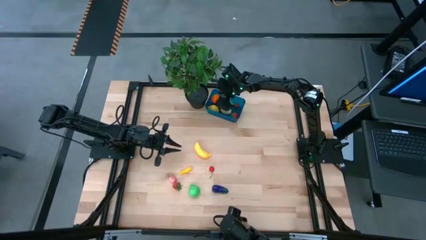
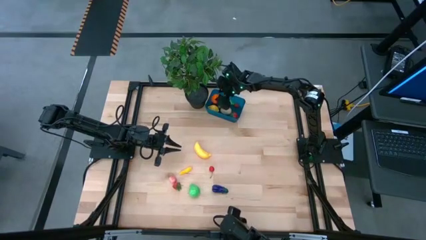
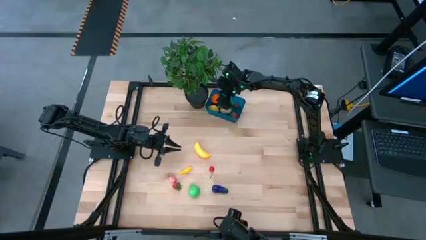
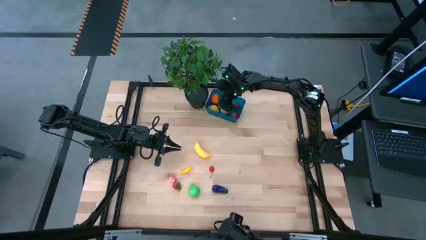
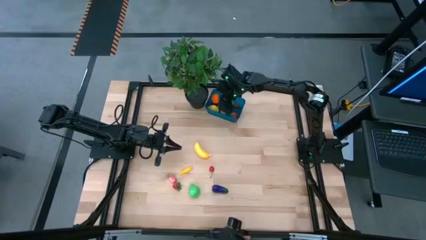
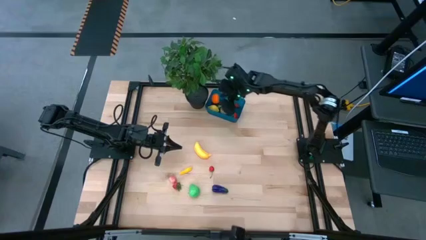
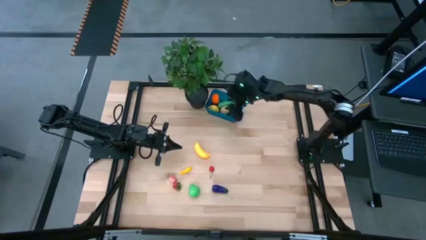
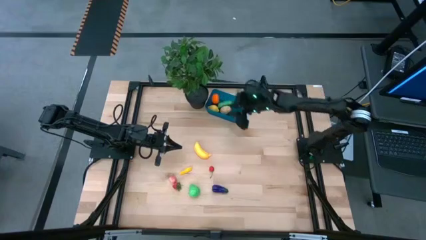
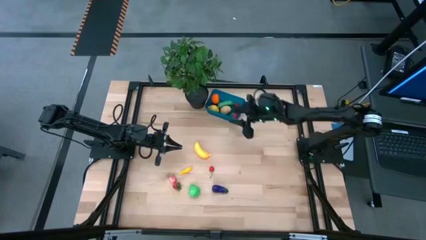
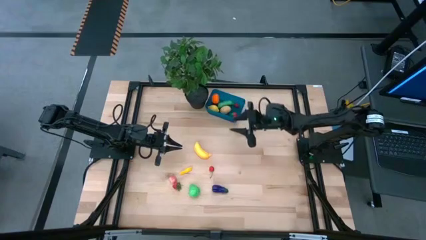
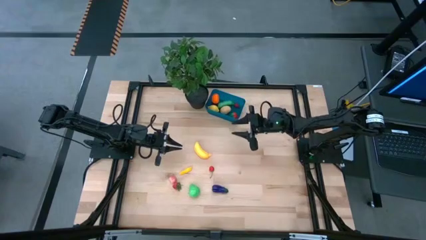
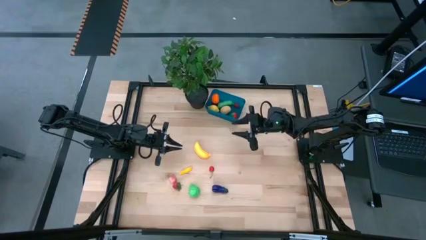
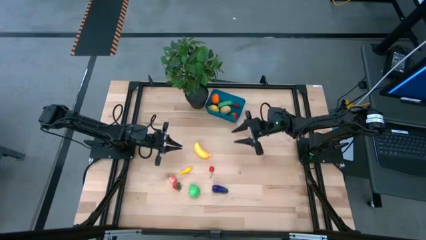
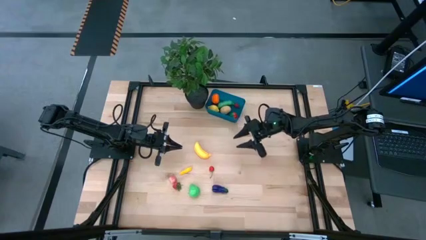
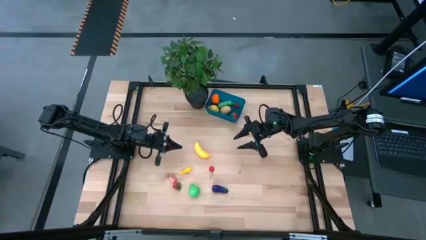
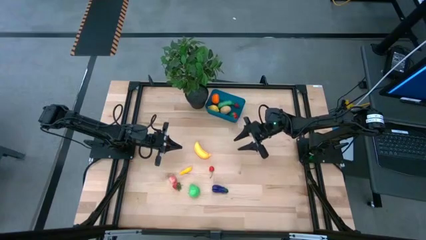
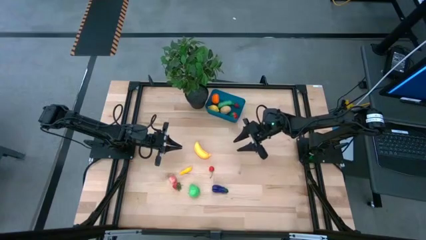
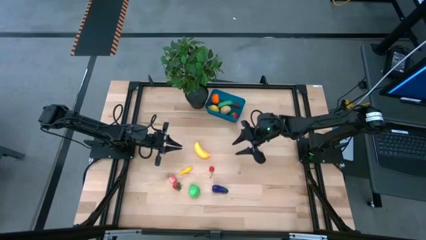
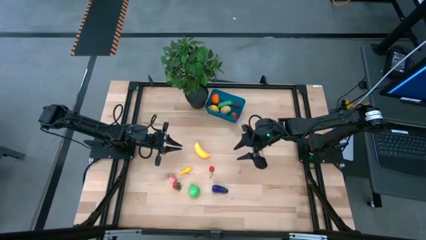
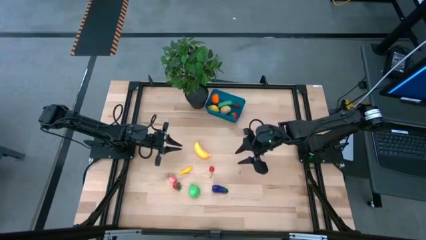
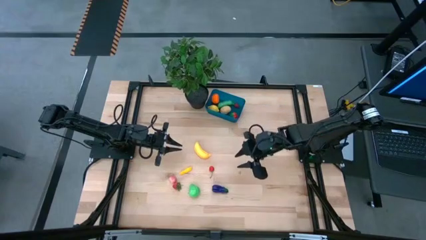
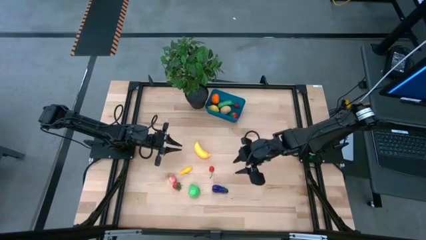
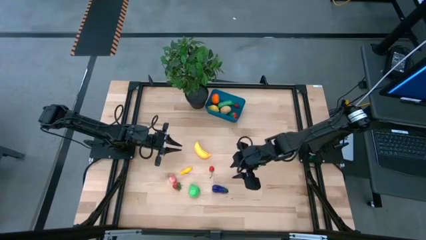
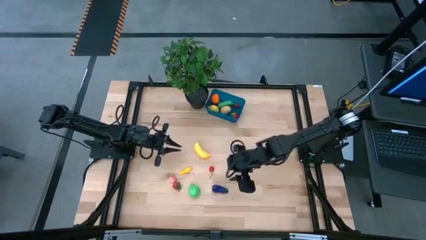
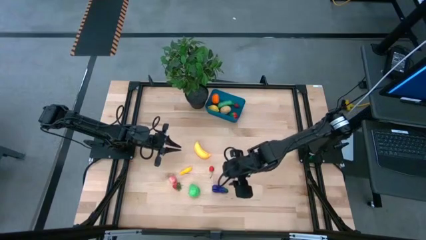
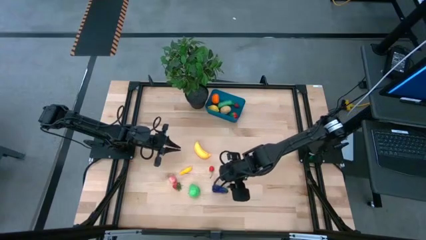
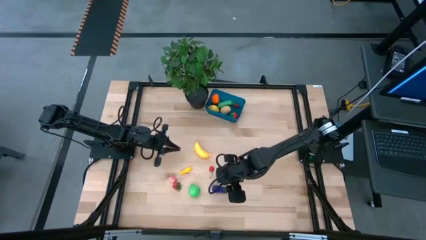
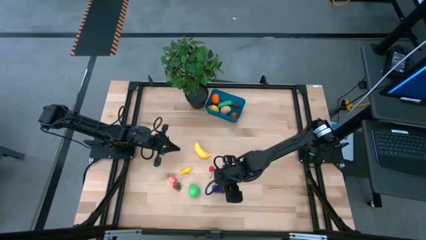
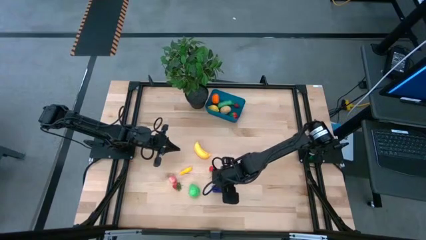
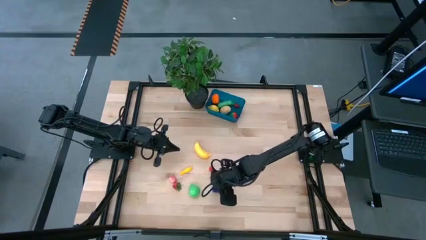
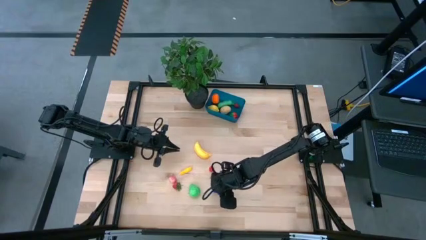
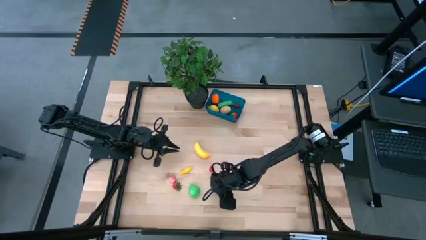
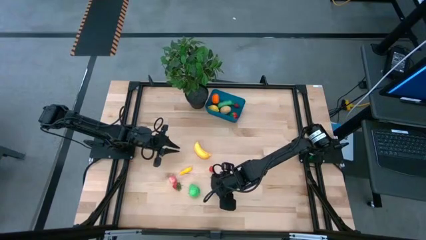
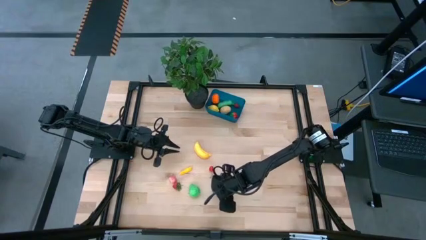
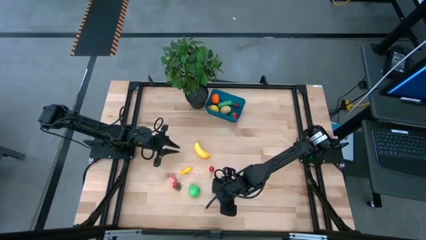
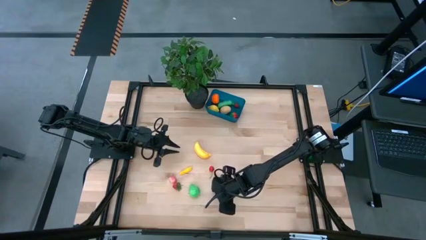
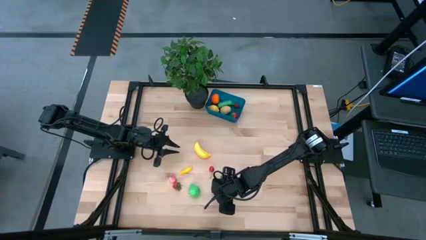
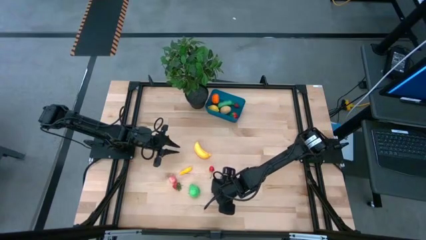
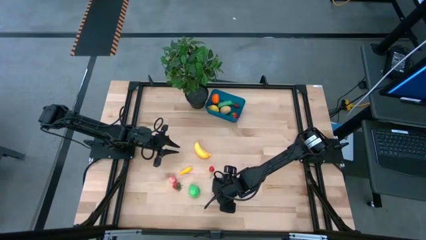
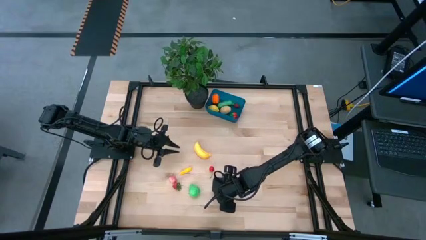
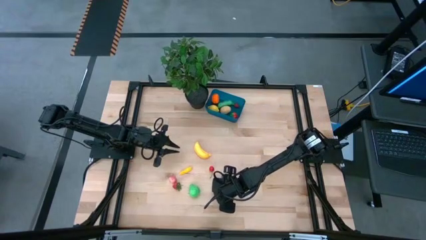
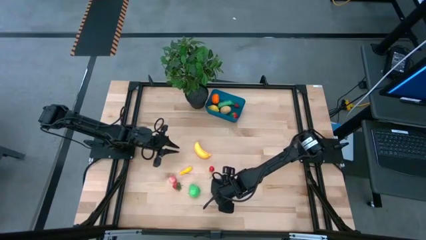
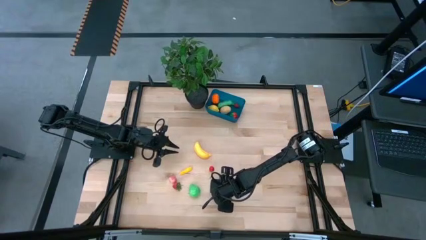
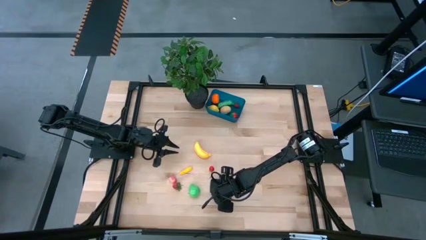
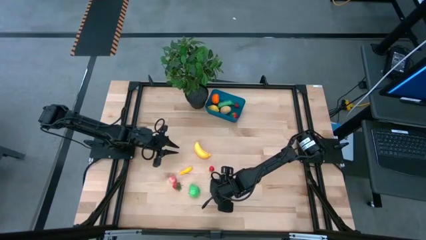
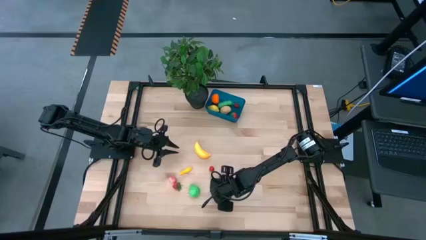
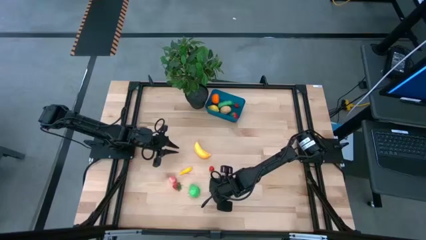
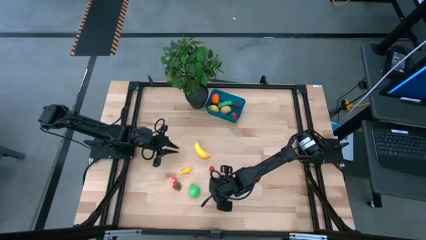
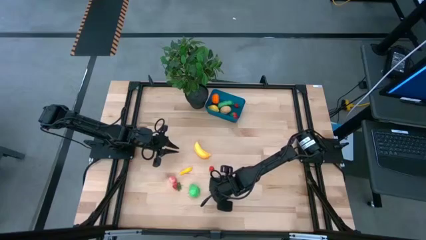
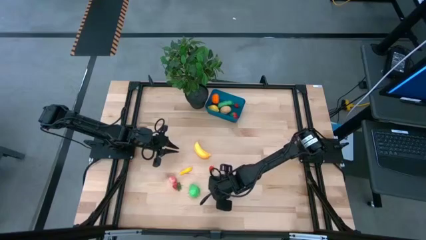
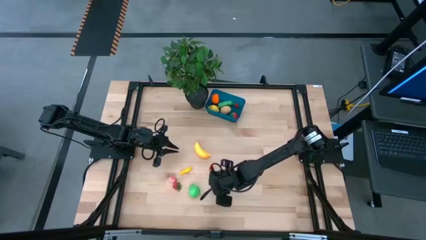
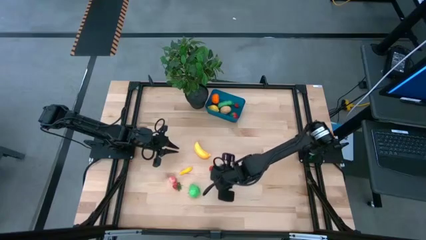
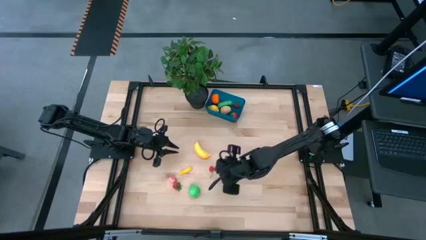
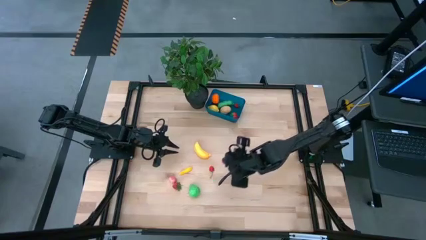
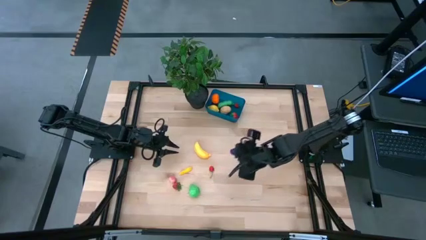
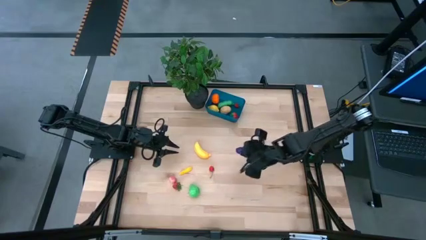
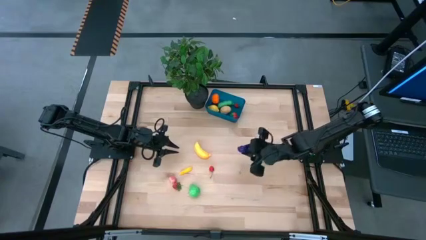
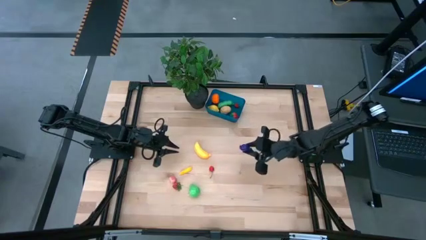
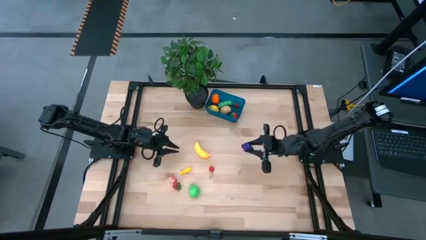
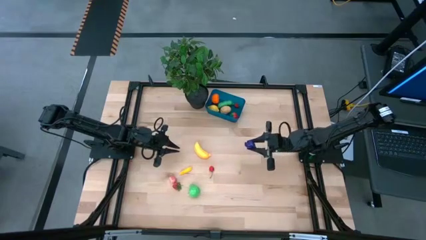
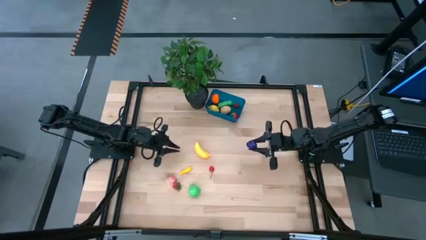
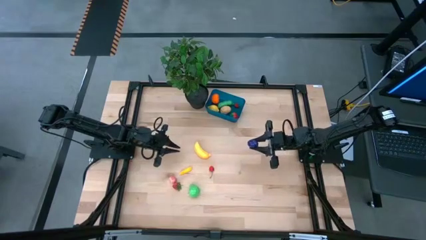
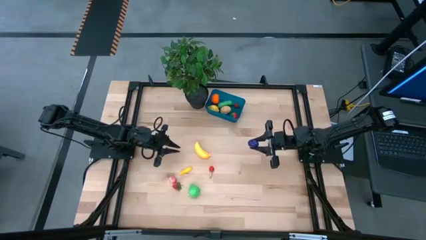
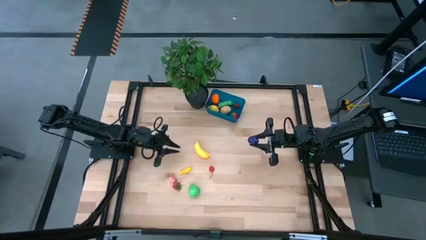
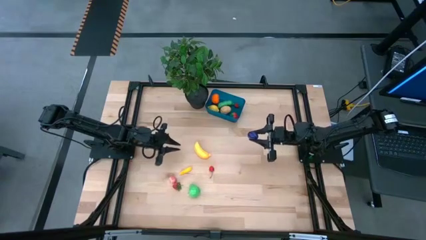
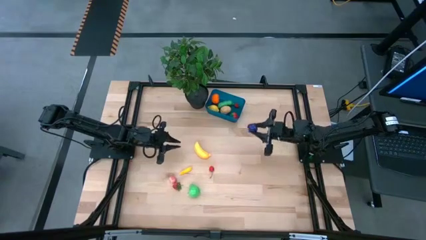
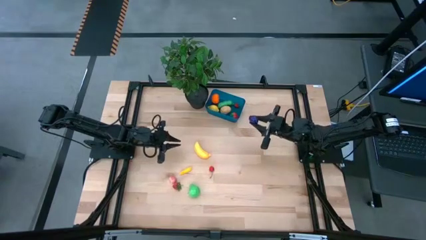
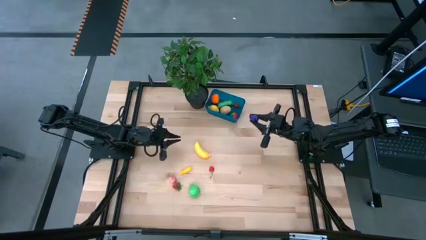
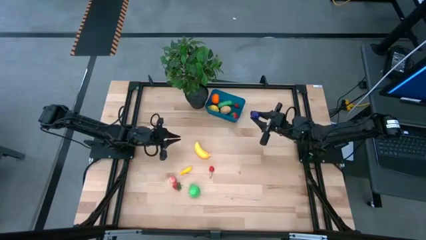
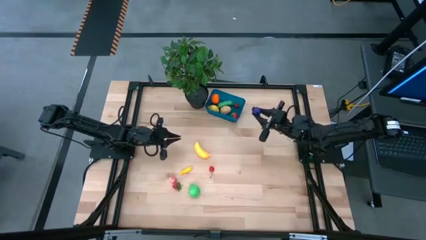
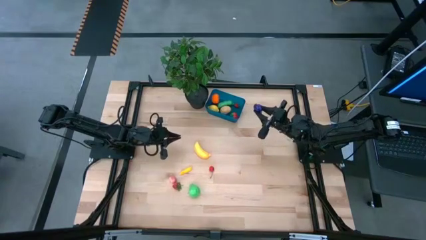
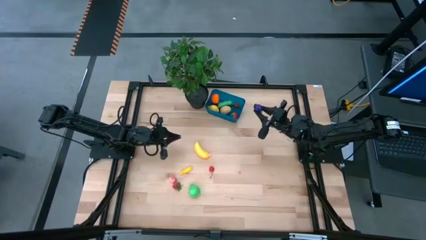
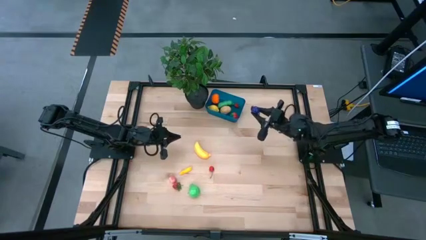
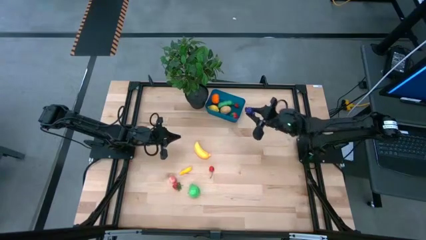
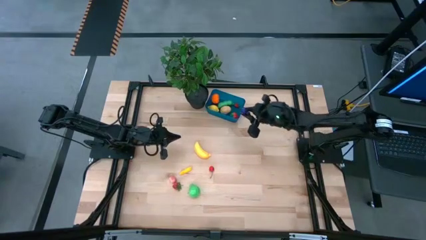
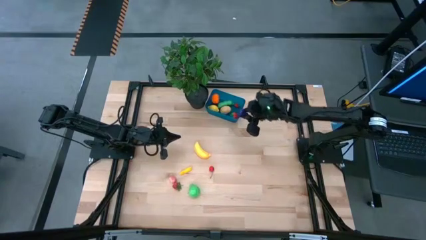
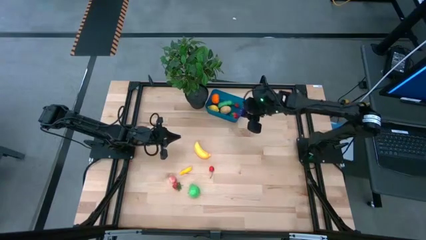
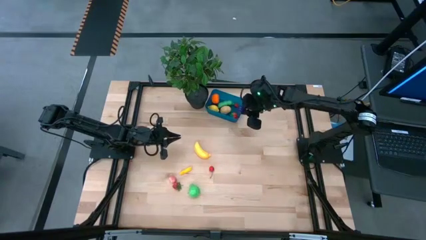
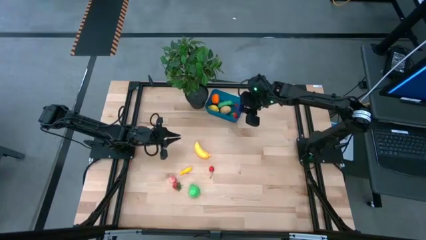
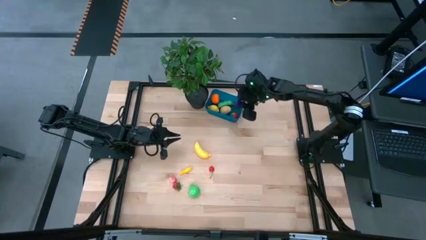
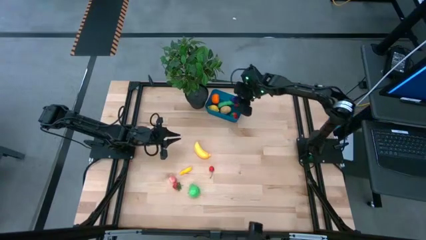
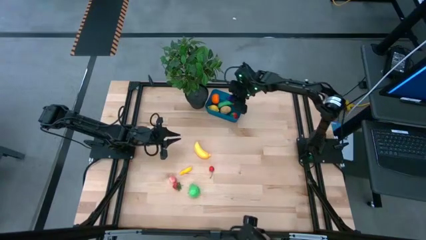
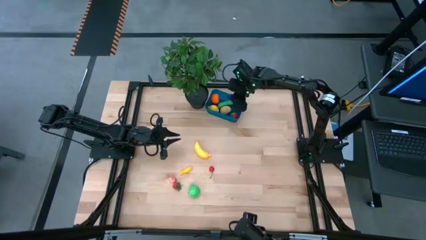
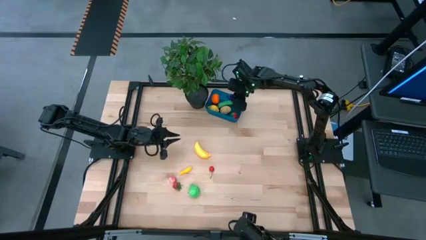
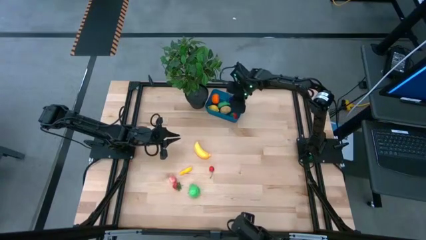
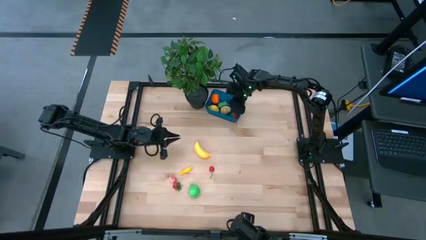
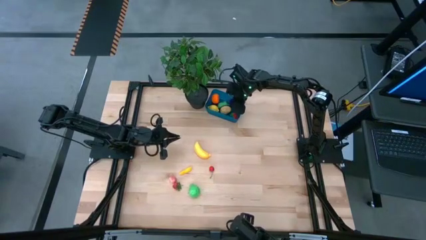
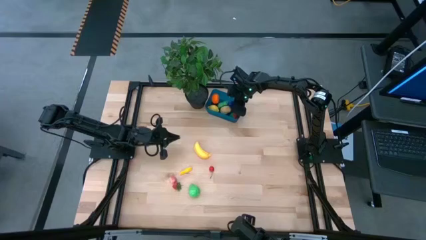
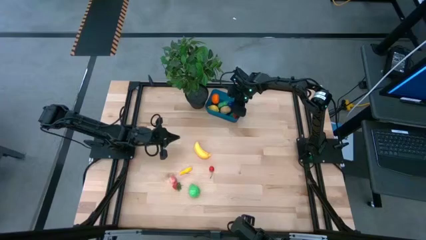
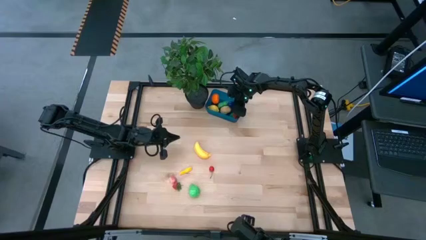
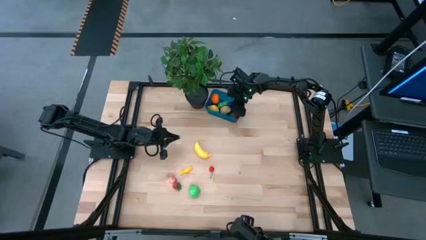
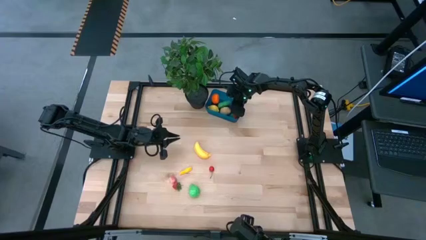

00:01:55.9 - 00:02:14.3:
Task: Pick and placing Produce into tupperware
Put the violet eggplant into the blue container
